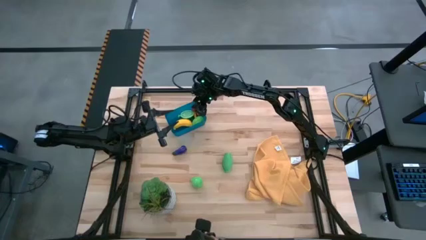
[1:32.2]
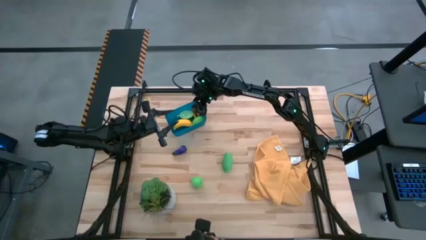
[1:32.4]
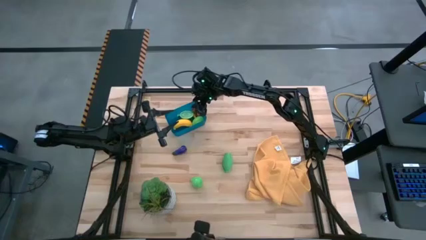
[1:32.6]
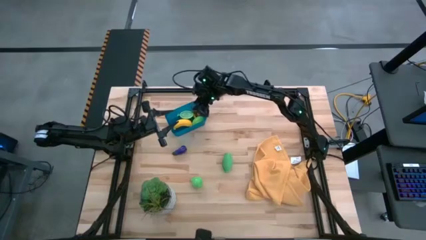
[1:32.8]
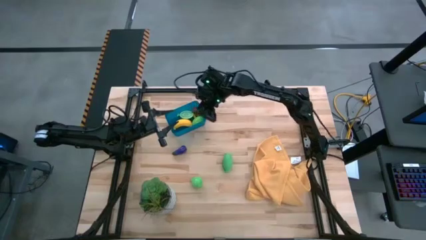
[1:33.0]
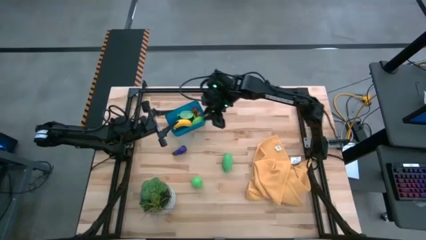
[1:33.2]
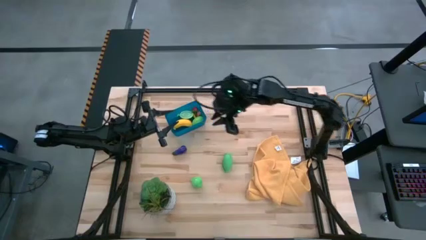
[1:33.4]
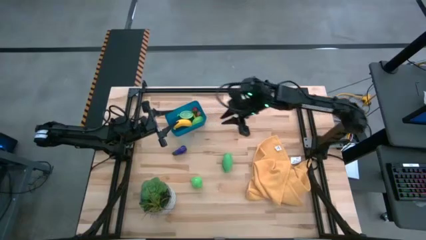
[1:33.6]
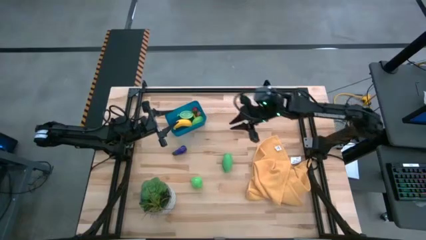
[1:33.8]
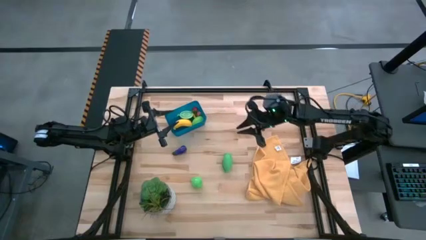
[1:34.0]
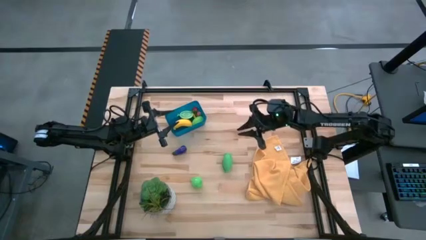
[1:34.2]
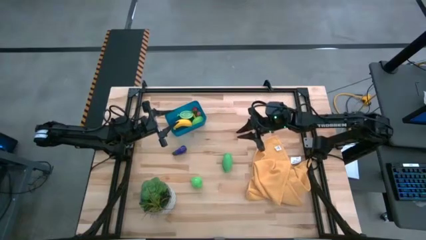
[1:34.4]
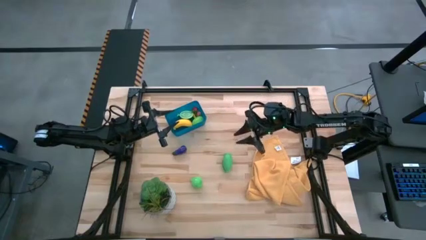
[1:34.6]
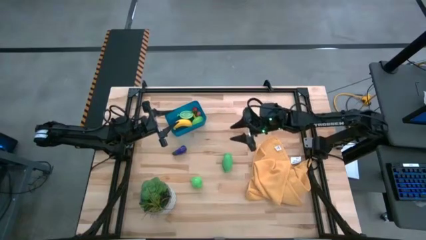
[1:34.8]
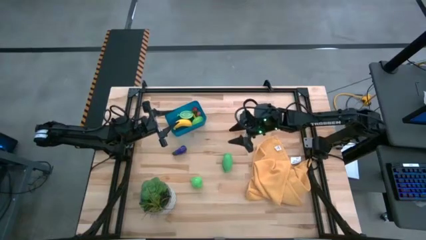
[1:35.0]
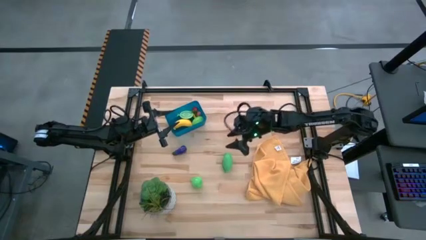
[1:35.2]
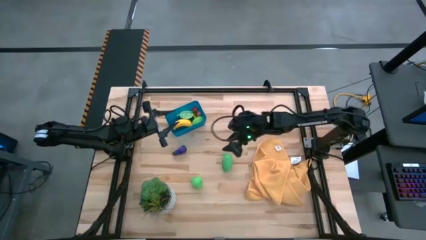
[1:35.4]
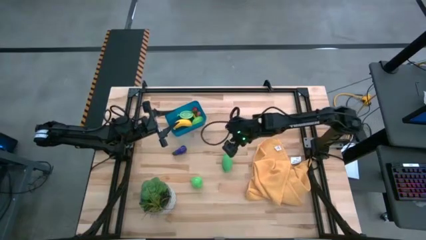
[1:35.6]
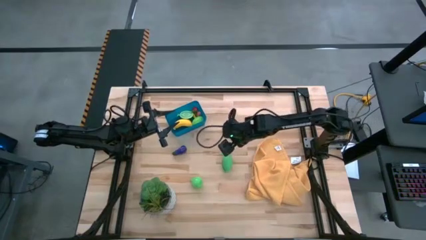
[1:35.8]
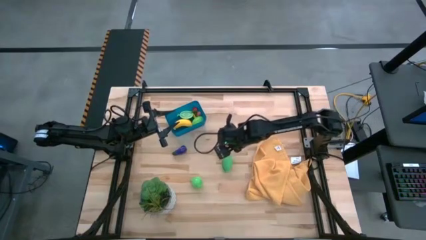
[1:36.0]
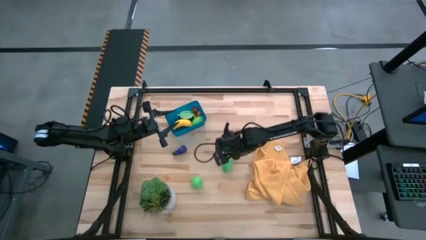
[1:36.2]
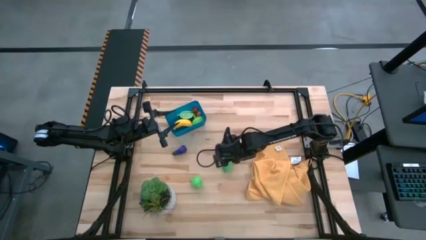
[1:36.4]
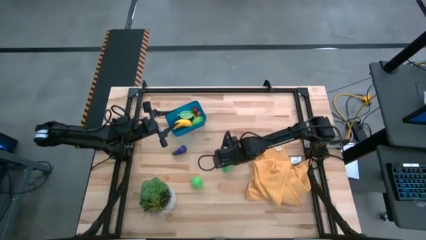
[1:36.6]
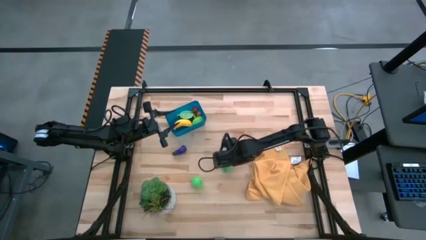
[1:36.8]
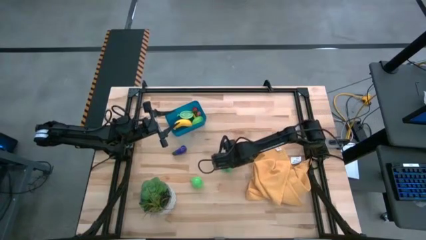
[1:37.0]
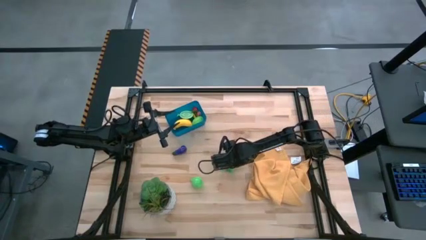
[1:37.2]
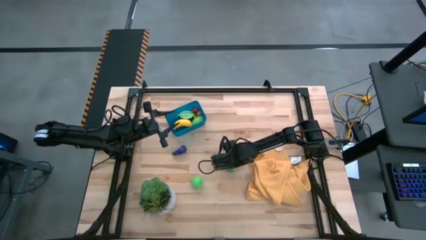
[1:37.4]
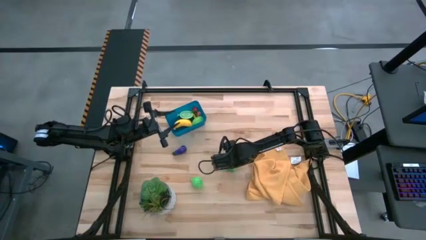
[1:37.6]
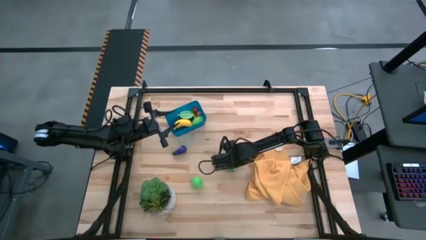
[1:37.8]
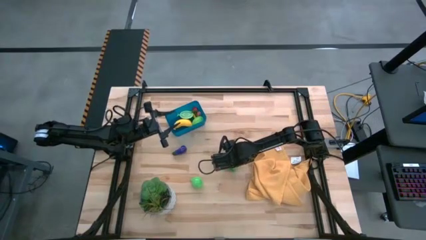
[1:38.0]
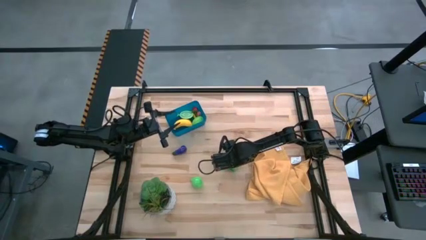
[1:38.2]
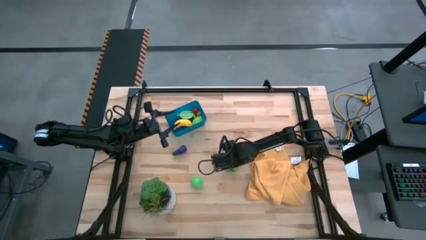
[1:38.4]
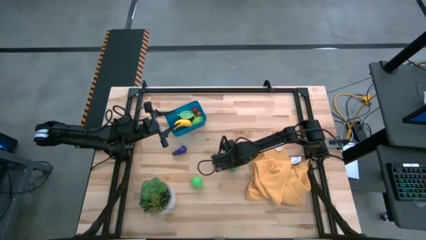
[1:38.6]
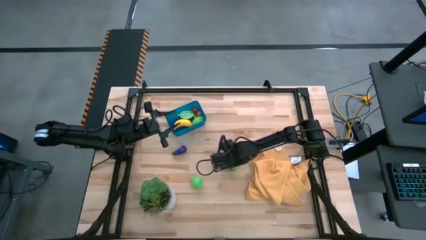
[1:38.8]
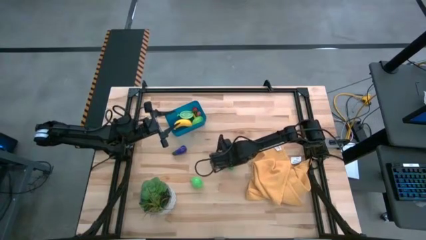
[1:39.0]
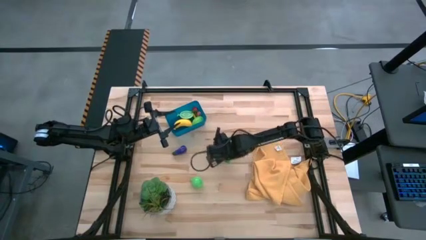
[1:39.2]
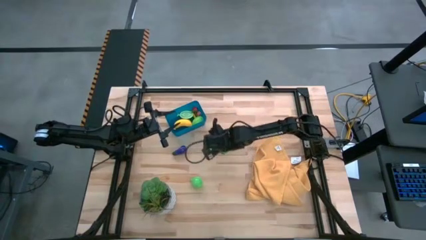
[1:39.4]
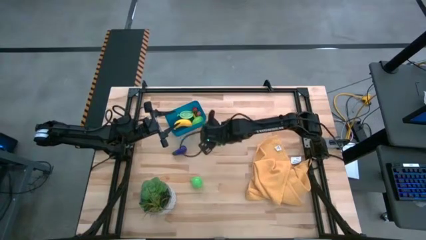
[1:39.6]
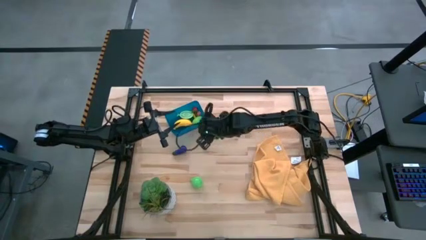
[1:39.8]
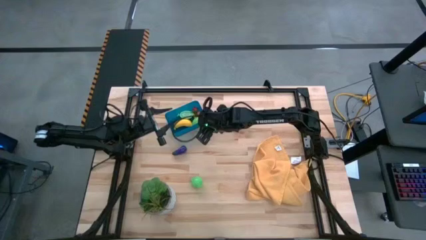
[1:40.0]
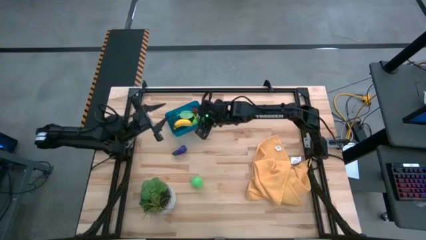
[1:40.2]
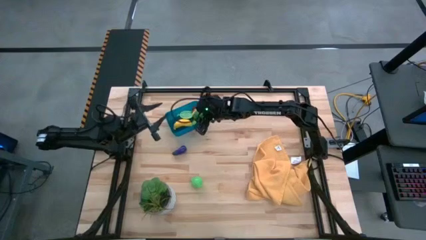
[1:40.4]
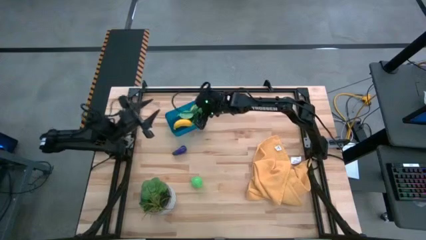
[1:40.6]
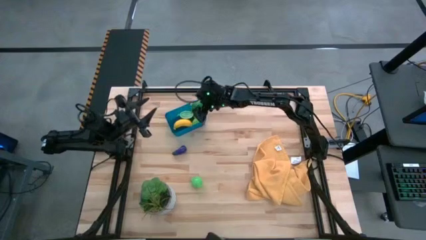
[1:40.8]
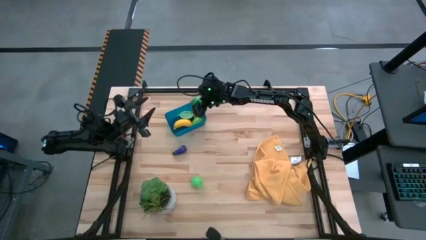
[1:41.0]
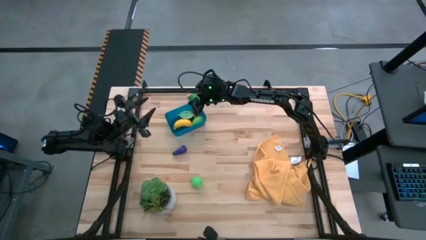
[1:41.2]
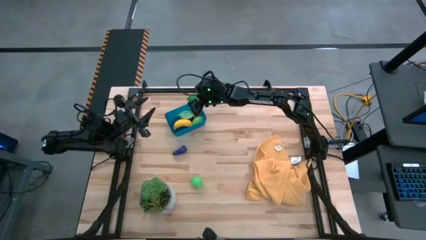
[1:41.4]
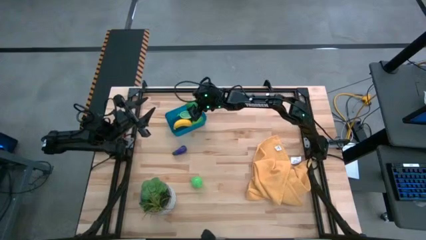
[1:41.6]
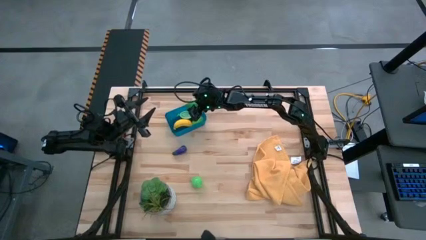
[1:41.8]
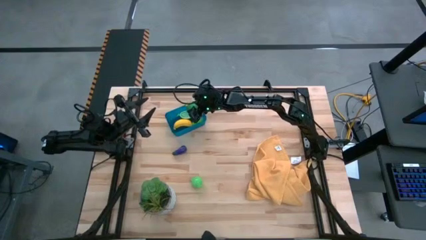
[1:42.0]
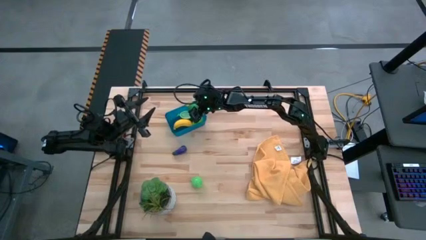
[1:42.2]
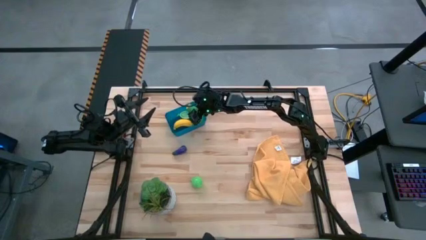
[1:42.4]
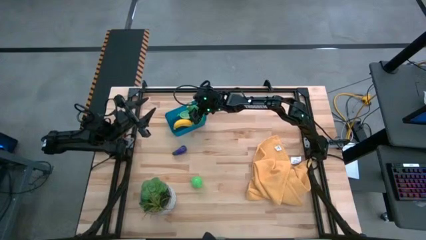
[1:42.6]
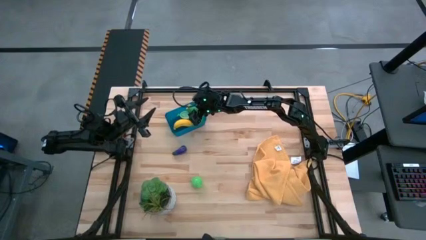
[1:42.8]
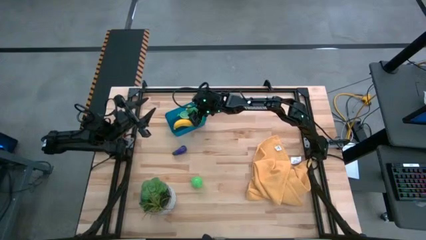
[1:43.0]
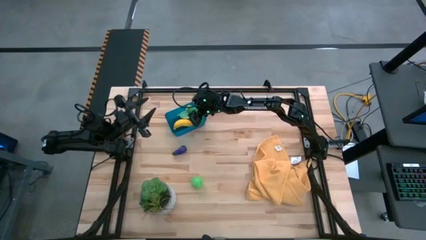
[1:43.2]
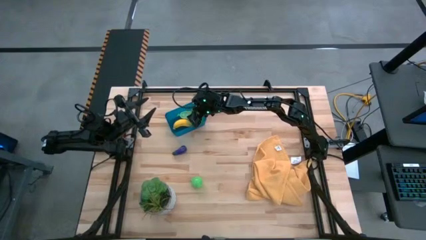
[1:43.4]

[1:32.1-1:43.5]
Task: Pick and placing Produce into tupperware
Put the large corn into the blue bin

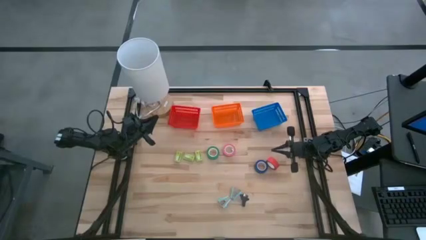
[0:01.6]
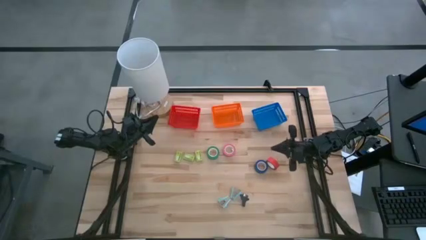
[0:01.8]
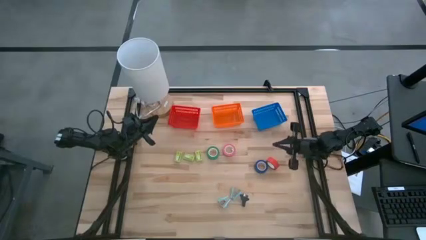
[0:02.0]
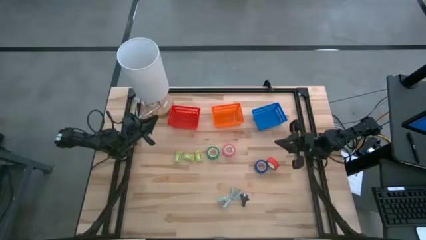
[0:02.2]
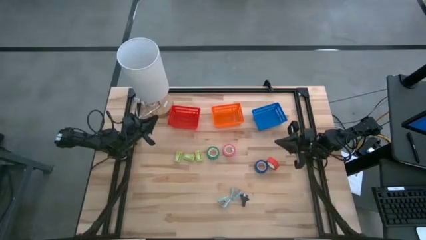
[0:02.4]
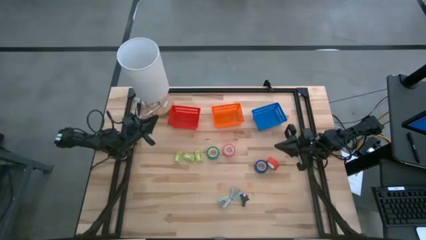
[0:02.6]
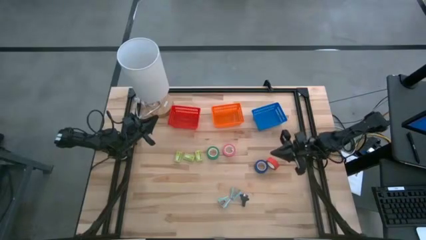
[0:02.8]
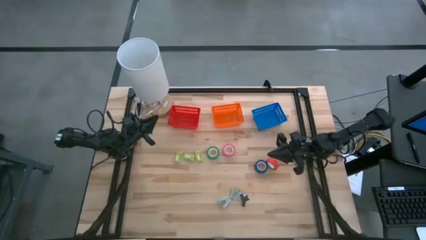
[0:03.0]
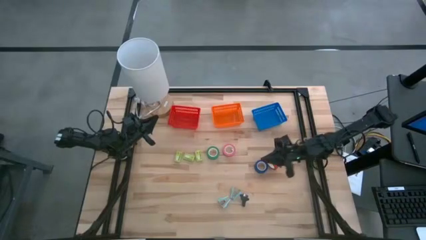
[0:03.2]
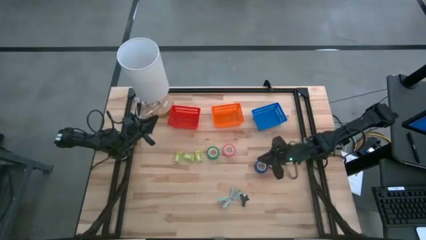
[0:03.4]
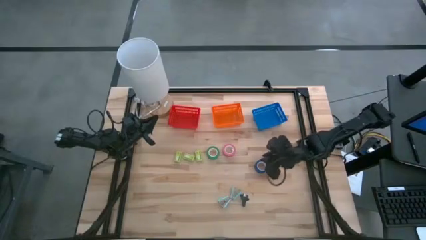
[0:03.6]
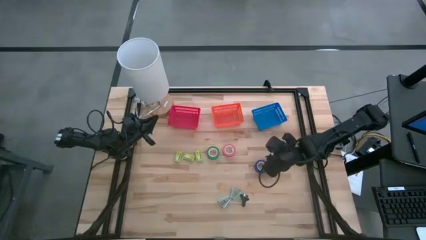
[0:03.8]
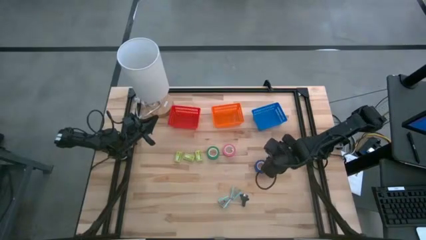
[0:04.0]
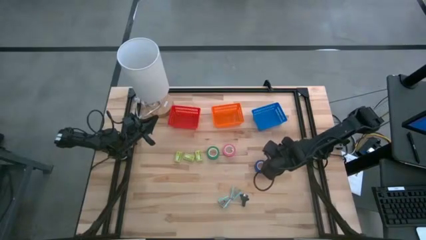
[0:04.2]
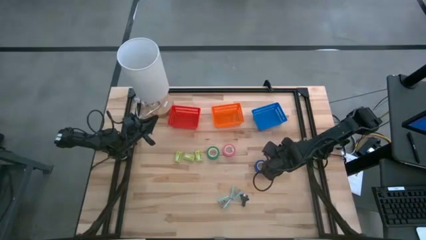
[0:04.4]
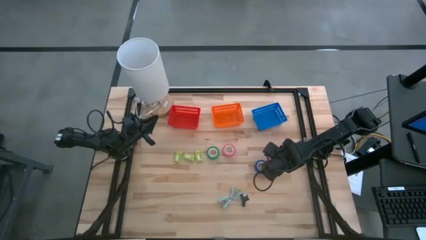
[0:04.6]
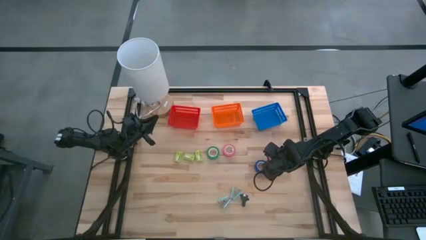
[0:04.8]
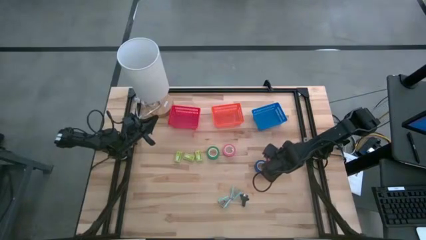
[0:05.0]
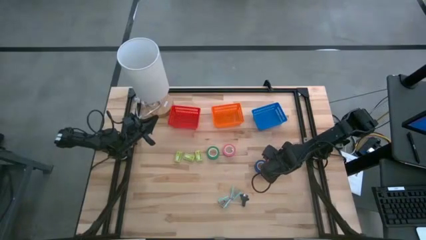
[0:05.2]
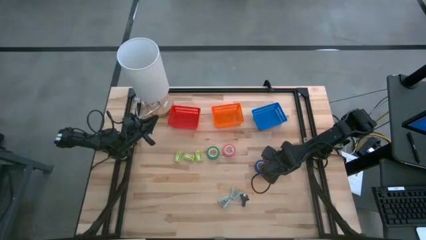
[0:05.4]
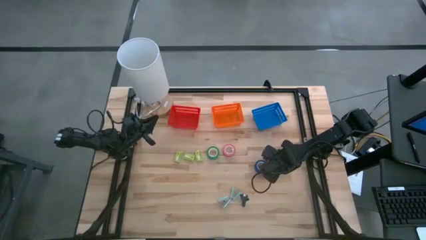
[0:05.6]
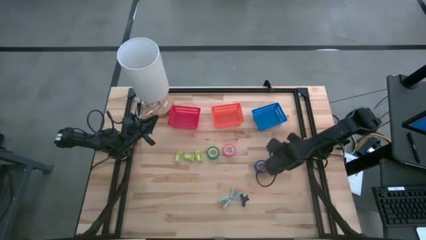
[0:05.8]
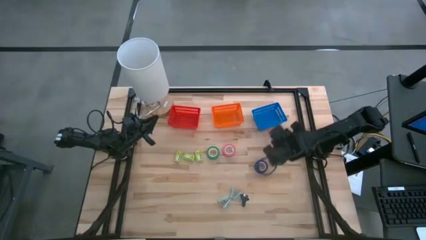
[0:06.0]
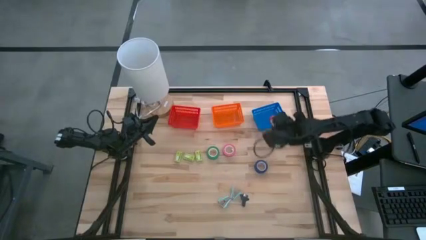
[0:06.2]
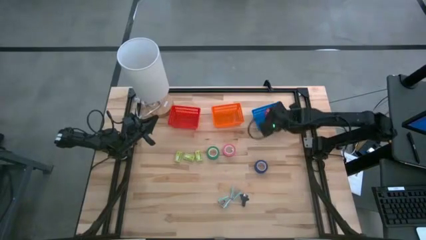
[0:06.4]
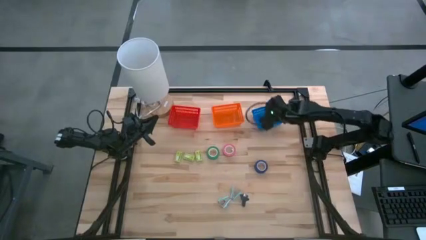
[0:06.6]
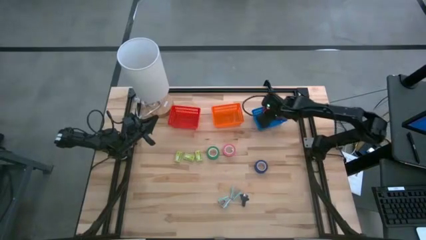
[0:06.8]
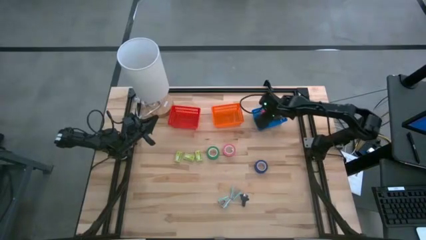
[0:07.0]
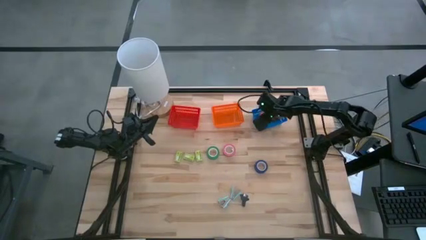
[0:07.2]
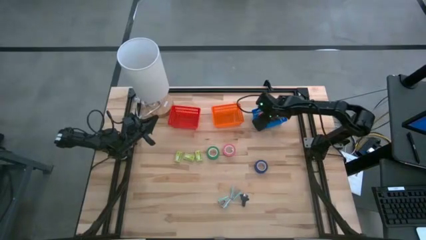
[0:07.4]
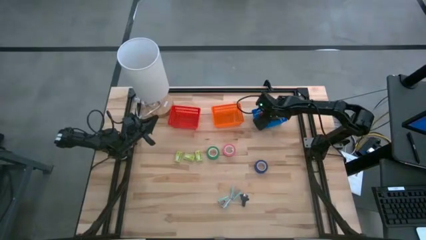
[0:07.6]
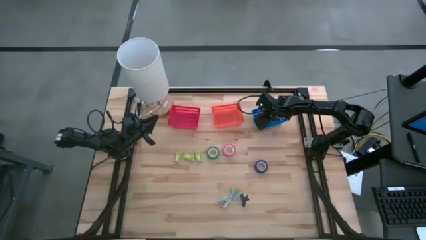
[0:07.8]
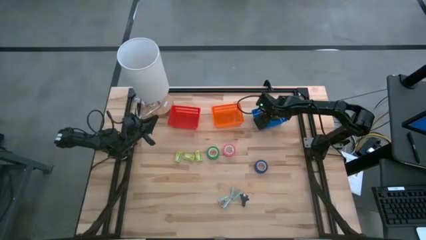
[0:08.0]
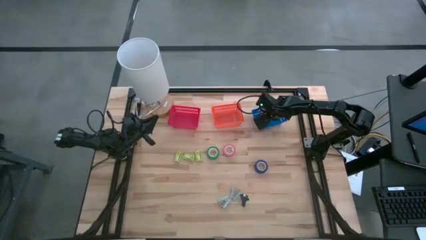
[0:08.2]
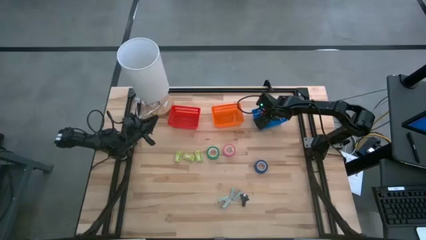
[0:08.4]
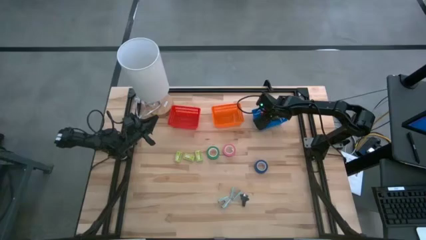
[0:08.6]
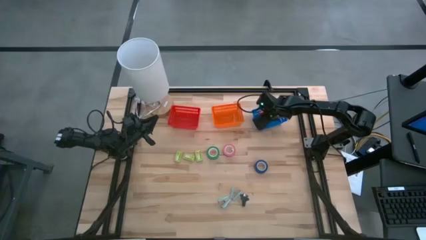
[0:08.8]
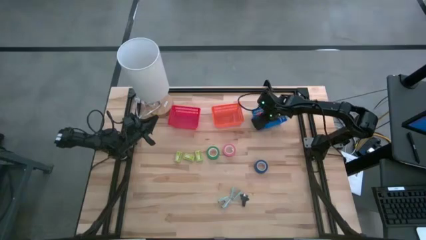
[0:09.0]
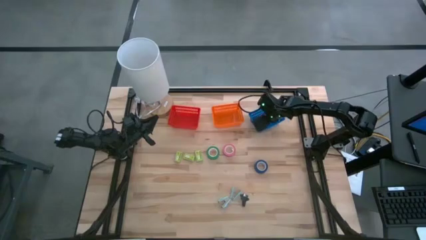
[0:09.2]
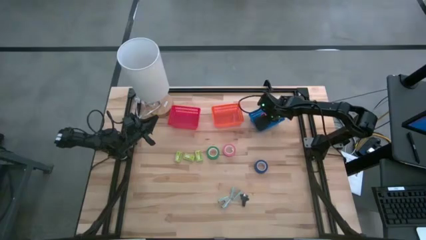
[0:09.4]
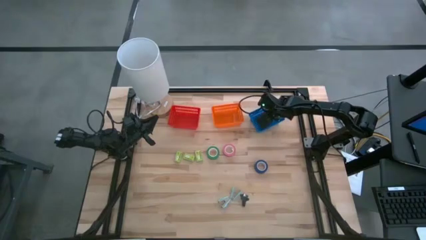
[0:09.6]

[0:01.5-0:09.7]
Task: Pick and place Stapler, Stapler remover, tape
Put the red tape into the blue bin
